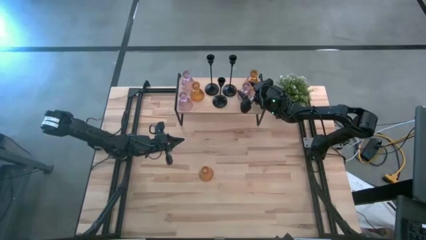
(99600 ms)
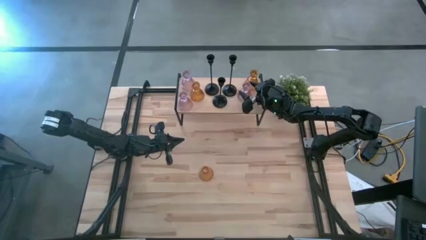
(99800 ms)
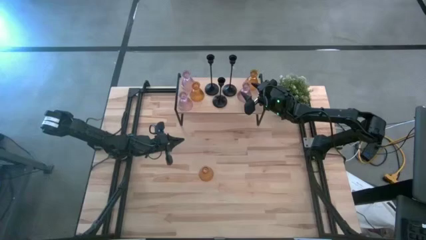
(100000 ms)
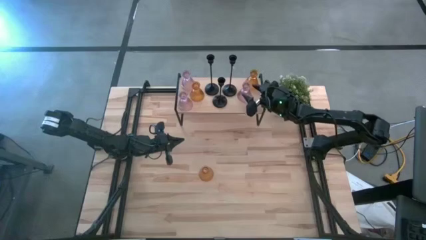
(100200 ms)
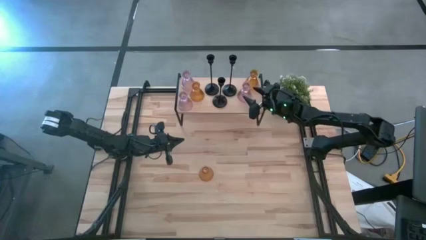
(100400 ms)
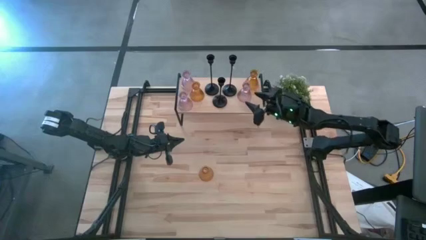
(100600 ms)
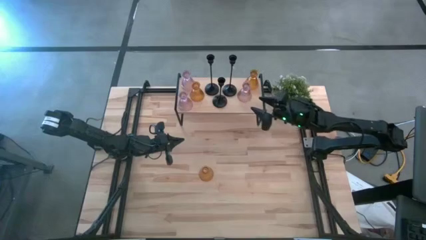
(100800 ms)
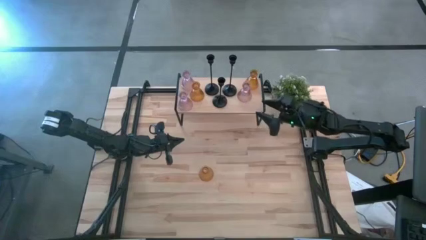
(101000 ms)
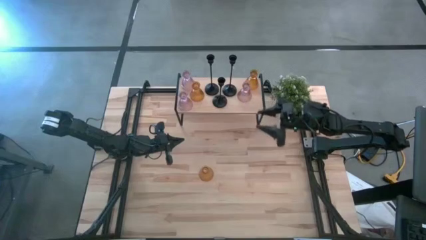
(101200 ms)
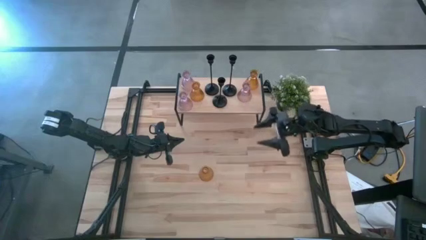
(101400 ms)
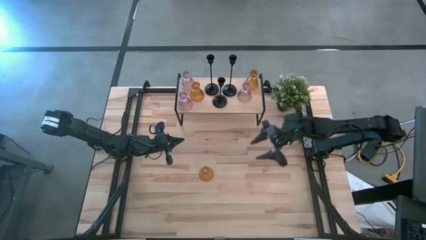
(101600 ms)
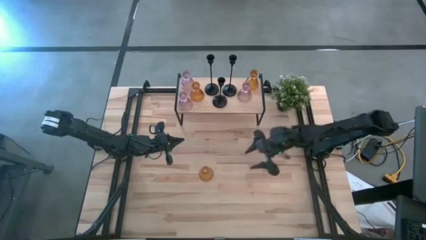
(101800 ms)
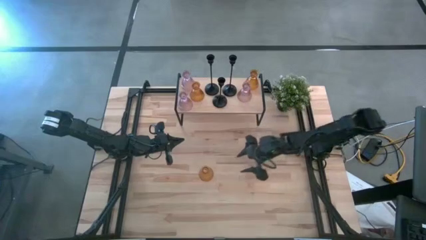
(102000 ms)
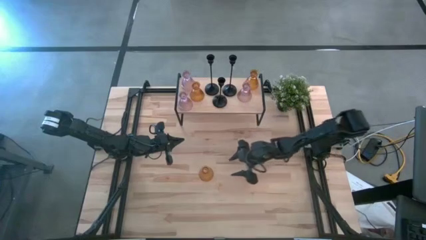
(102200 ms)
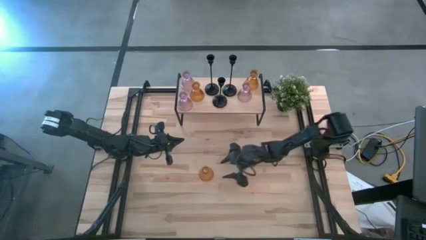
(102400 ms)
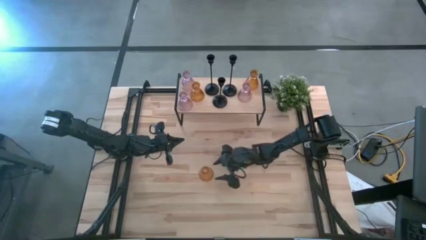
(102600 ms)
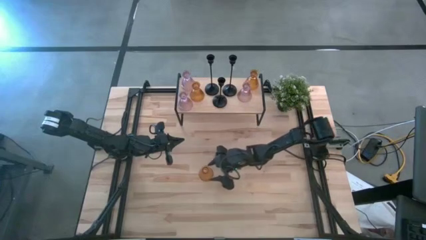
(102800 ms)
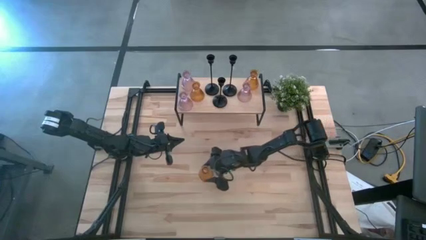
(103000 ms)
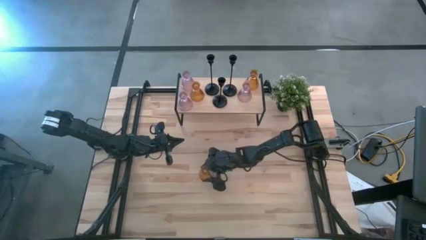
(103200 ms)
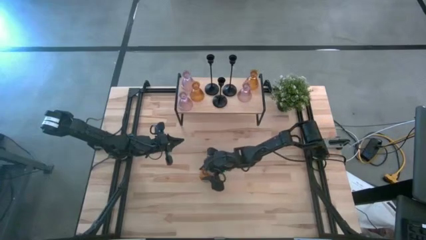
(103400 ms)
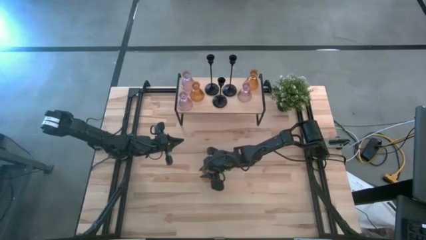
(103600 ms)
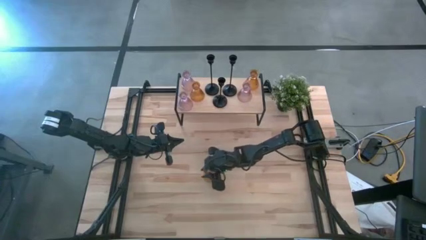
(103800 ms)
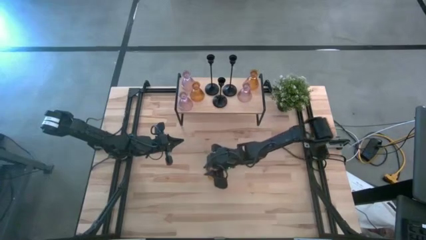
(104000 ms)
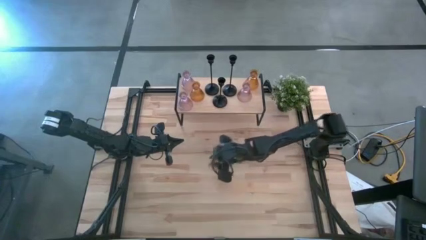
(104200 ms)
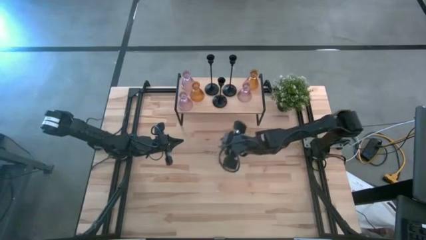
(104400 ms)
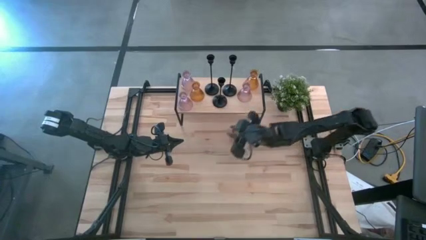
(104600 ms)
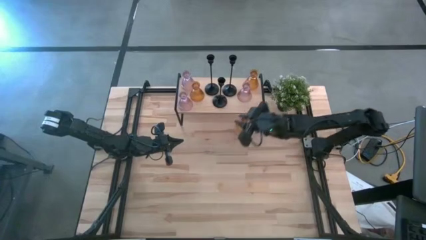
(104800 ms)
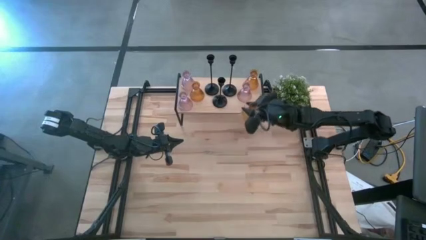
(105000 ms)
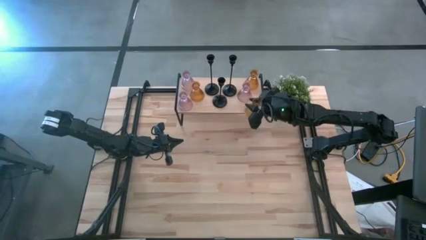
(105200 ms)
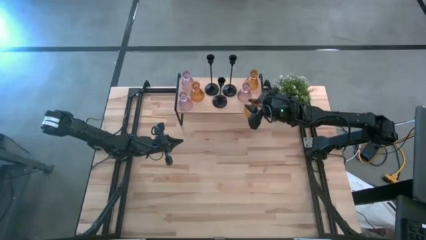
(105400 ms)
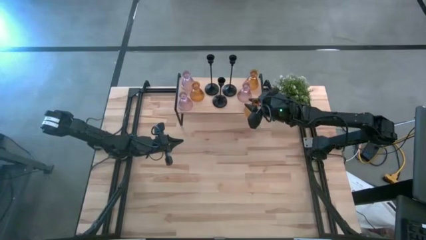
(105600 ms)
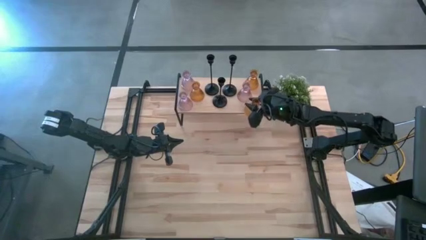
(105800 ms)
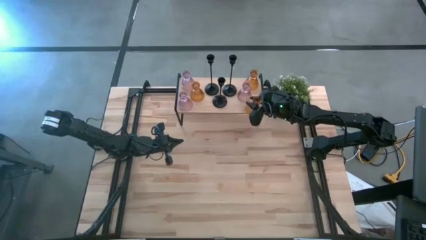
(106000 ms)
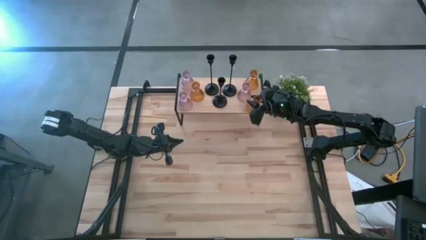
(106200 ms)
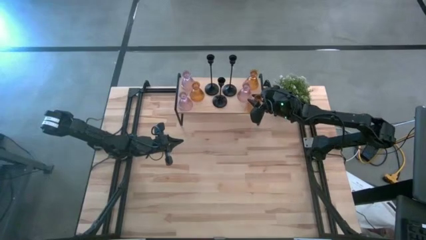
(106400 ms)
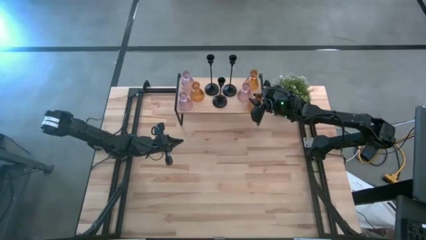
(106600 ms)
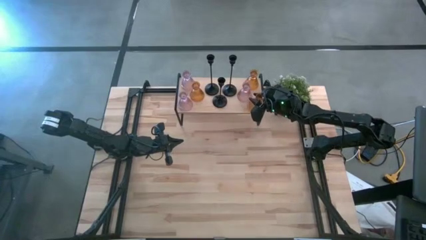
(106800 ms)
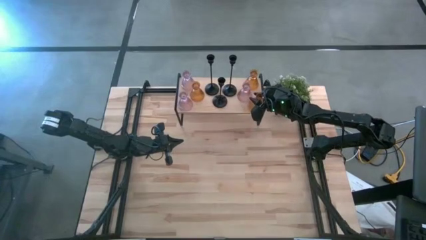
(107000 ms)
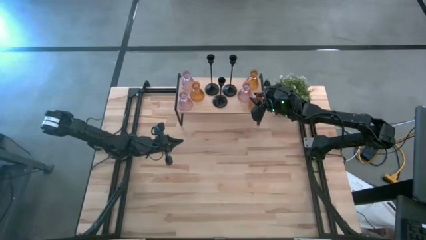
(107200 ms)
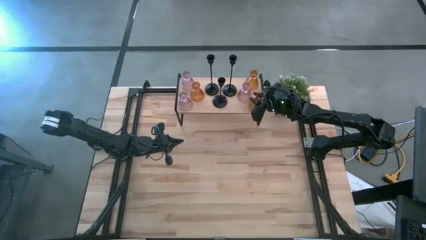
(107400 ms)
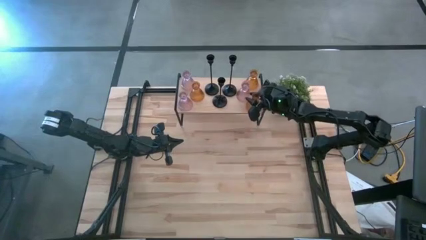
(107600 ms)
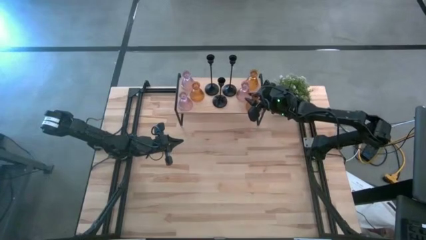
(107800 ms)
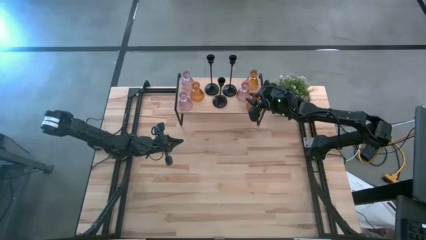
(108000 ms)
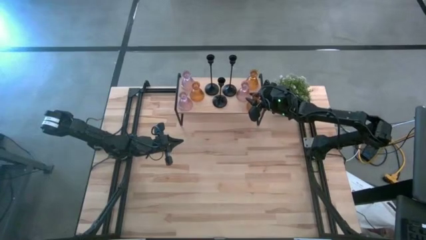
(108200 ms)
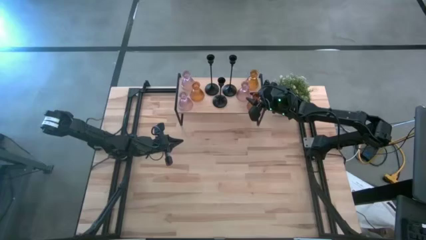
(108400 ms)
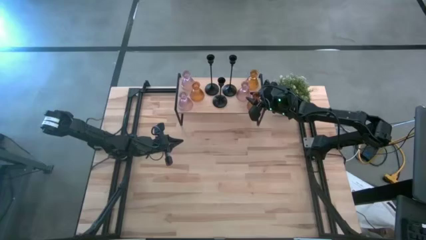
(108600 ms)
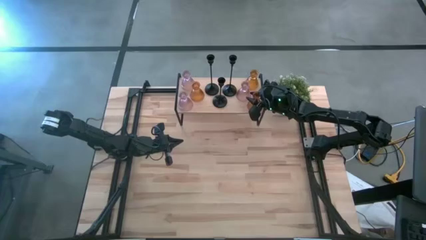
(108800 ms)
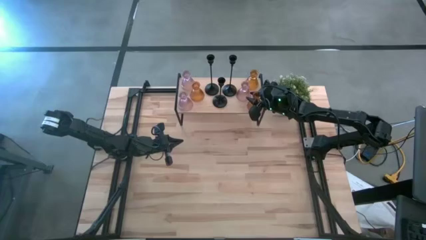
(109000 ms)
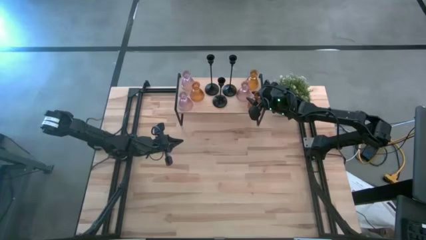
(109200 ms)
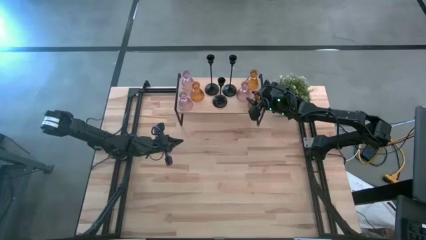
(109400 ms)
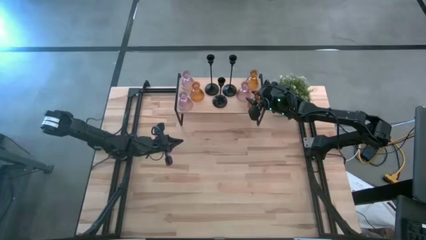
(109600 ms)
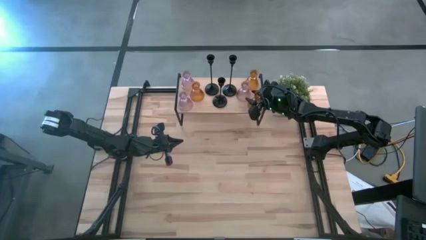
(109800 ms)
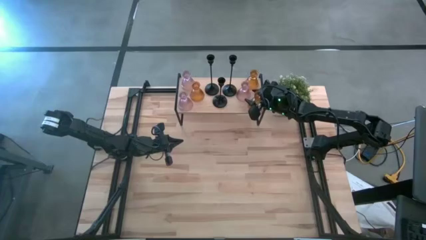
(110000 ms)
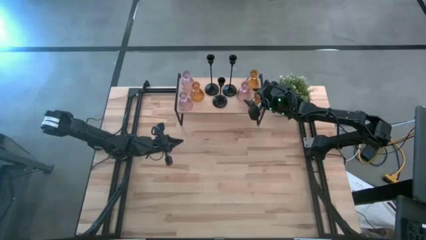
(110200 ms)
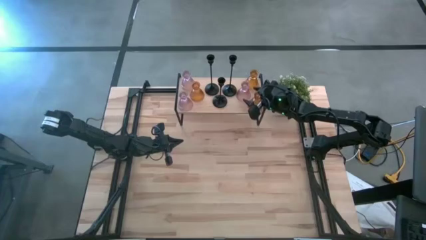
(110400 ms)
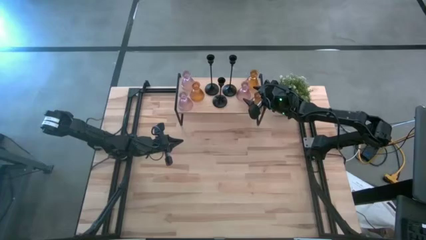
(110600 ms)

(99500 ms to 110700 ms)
Task: Pick & Place candle stick holders
Put the orange glass candle holder on the shelf

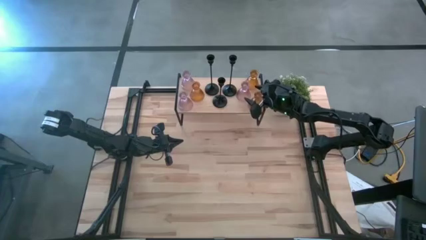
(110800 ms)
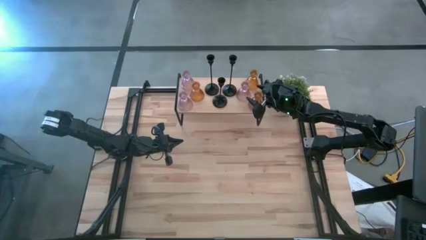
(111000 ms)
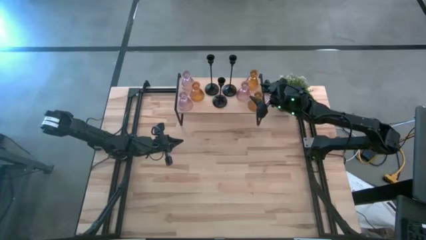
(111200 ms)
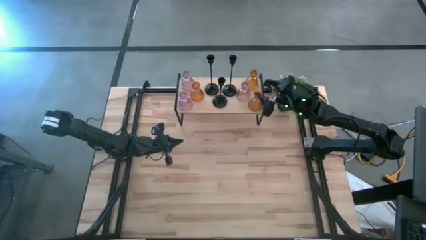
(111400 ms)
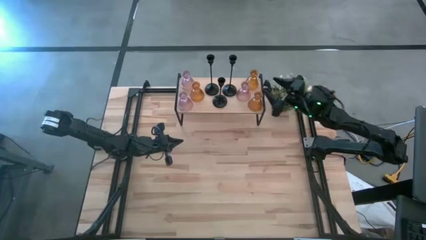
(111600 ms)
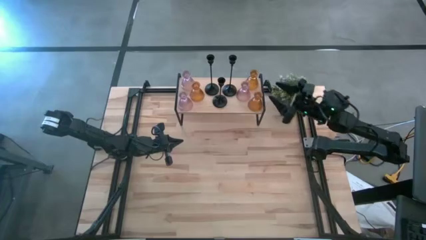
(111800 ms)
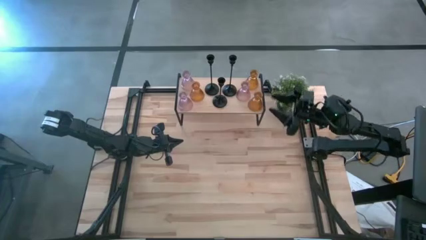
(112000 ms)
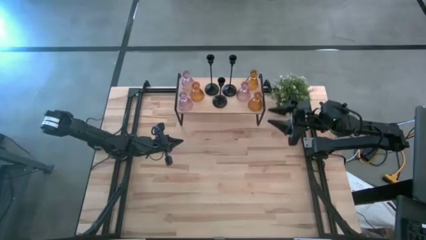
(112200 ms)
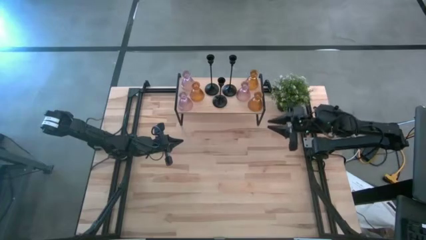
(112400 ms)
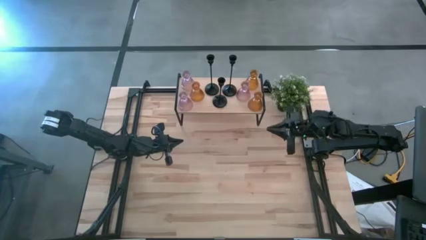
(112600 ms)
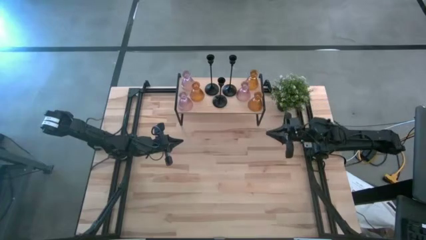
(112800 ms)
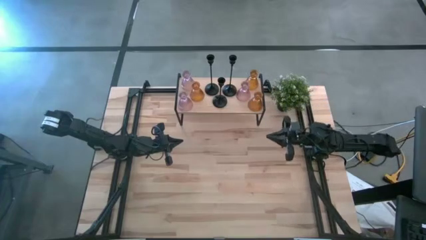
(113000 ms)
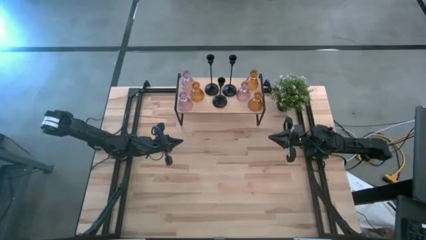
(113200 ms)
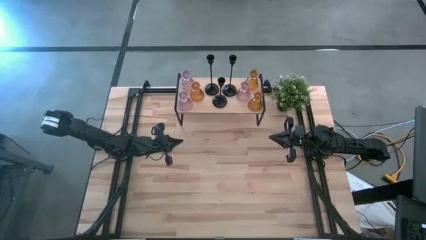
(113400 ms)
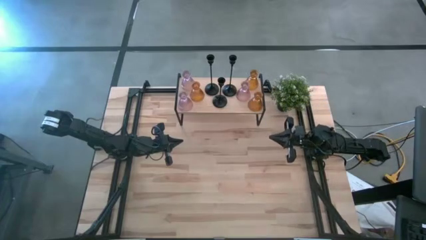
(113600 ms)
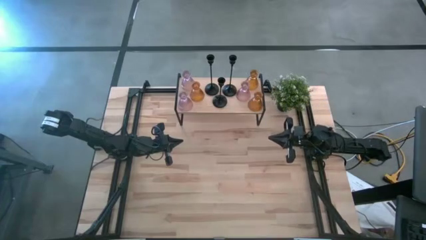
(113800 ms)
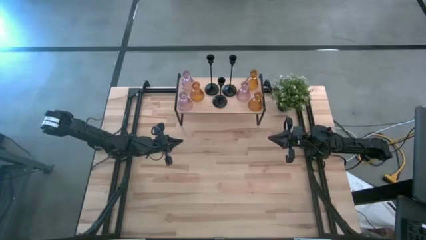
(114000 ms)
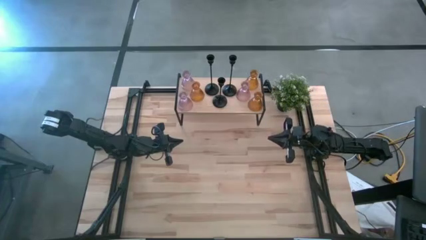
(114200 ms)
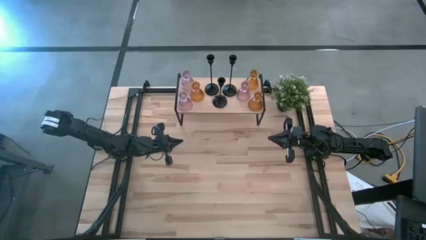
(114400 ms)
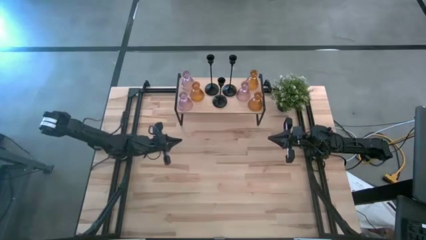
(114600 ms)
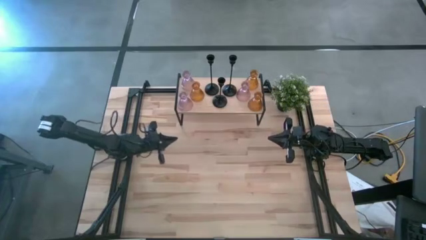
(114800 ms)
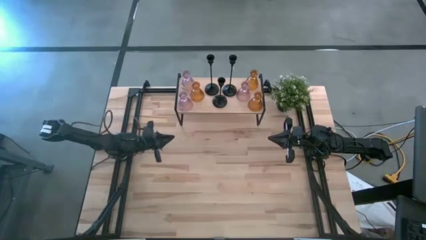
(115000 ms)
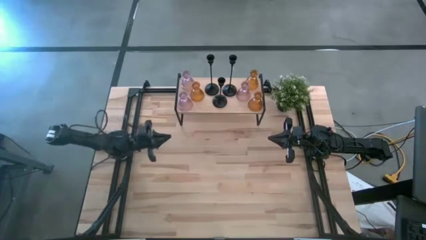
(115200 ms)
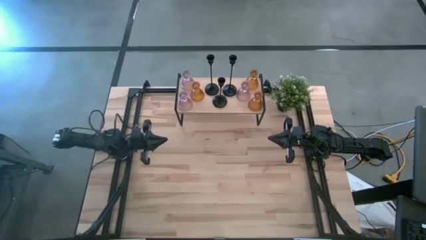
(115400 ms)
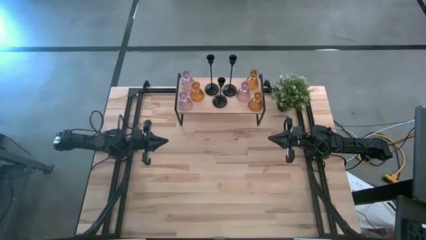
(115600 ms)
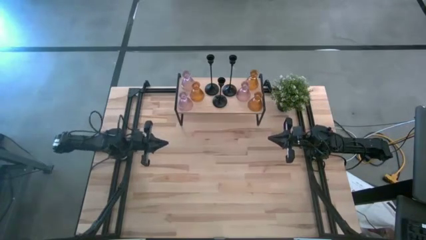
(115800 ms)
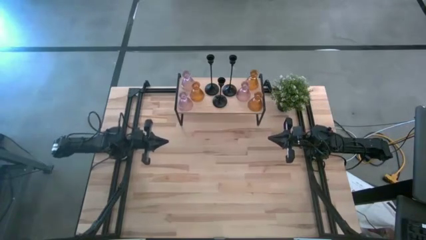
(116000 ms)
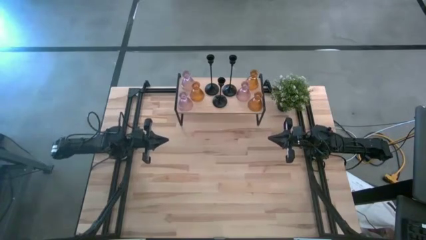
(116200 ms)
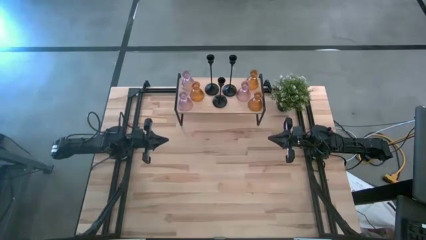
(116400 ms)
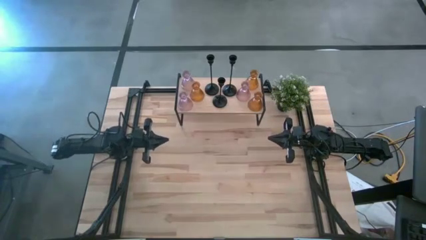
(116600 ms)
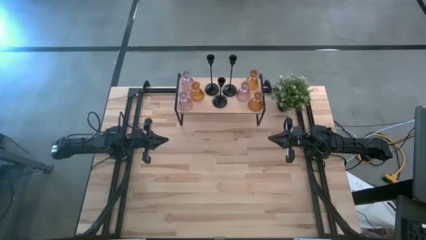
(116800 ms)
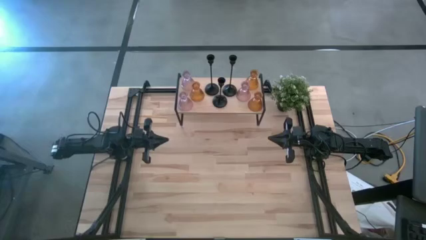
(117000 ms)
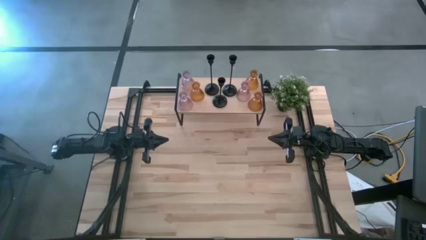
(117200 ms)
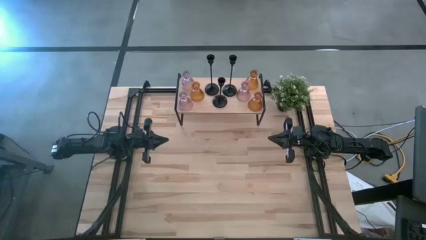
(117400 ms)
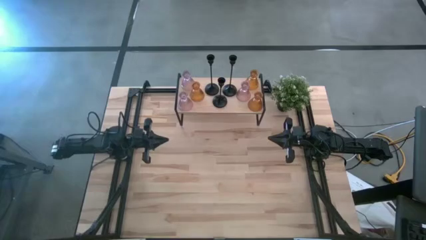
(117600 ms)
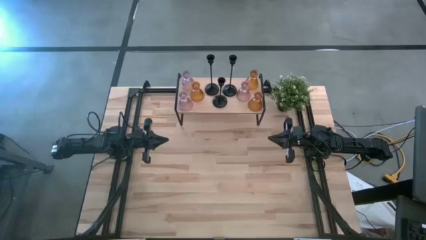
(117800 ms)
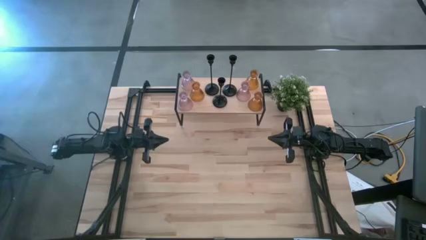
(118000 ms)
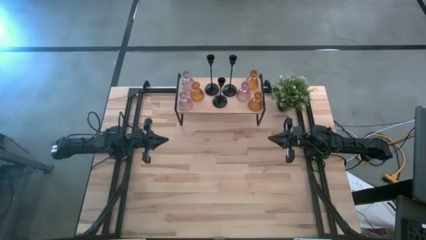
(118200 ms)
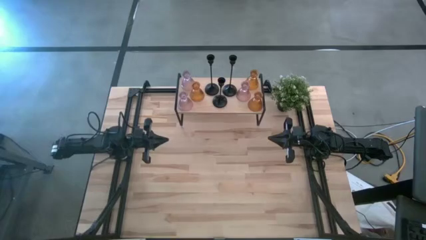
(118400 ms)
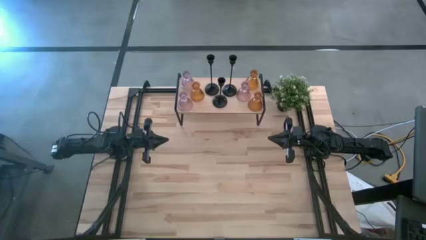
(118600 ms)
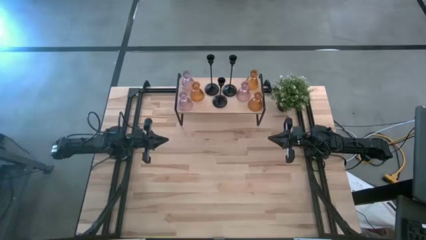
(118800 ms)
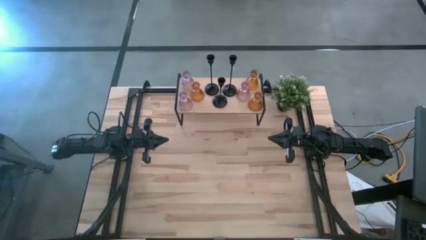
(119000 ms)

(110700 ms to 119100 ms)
Return to Home Position
